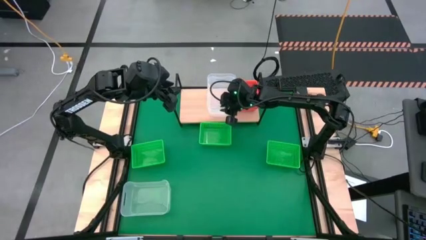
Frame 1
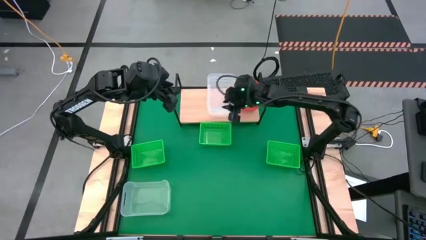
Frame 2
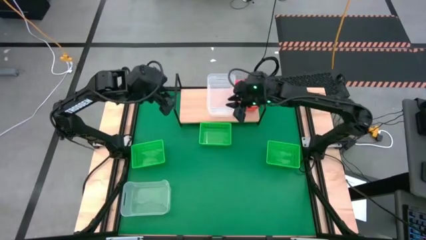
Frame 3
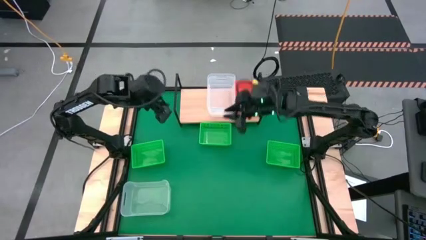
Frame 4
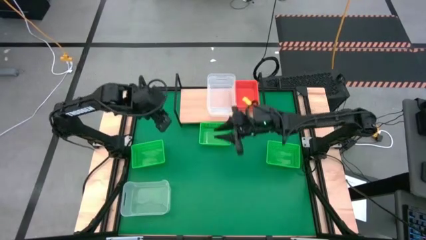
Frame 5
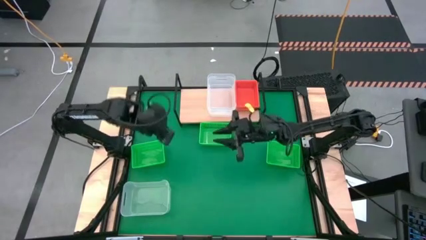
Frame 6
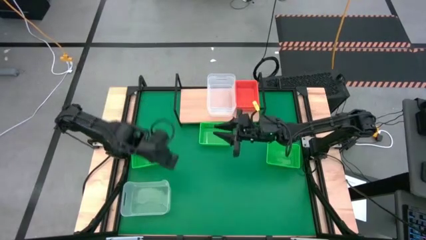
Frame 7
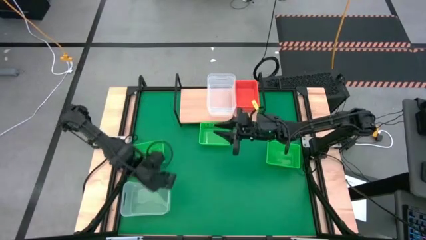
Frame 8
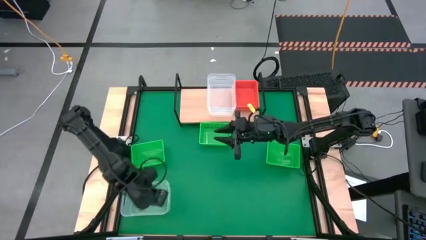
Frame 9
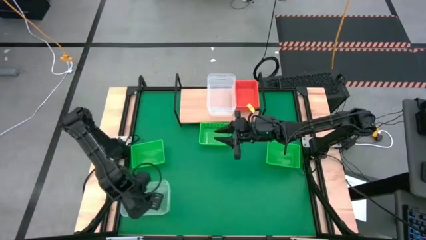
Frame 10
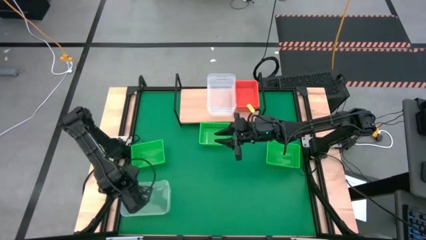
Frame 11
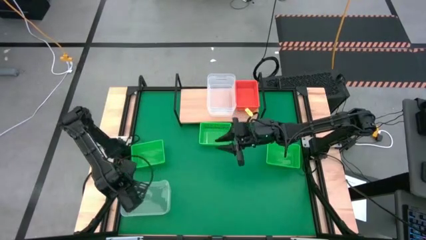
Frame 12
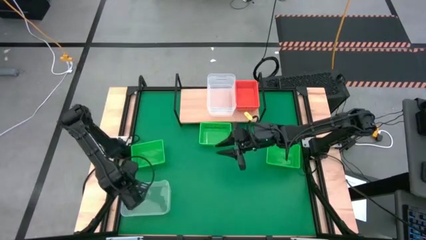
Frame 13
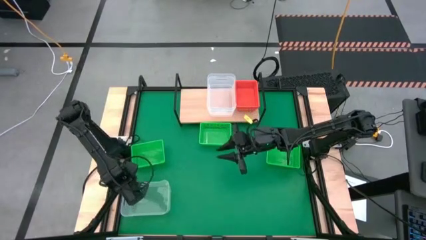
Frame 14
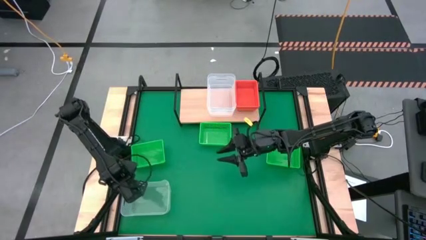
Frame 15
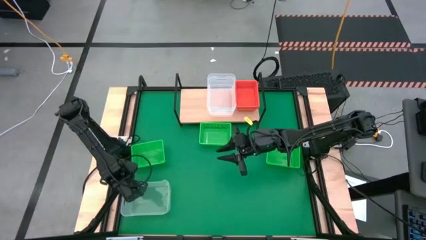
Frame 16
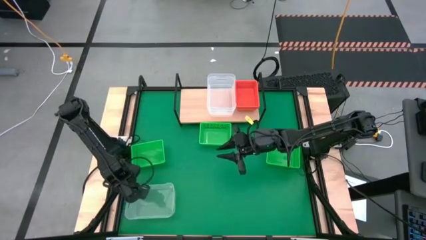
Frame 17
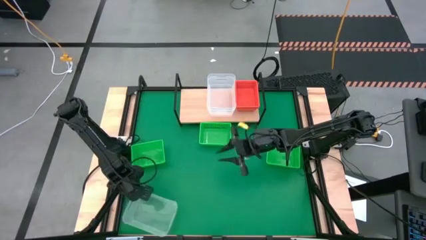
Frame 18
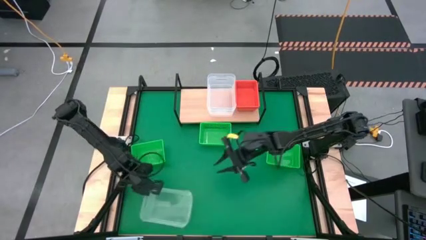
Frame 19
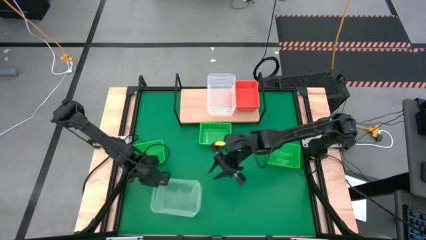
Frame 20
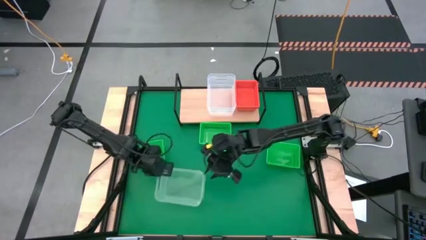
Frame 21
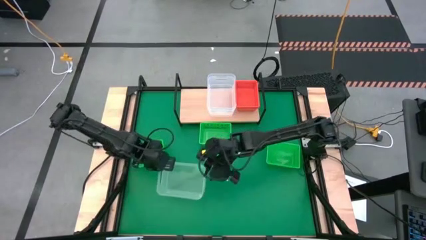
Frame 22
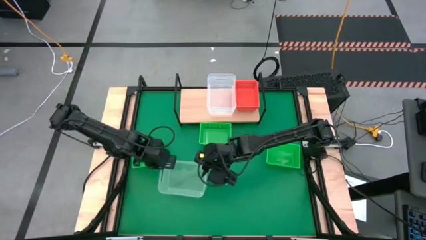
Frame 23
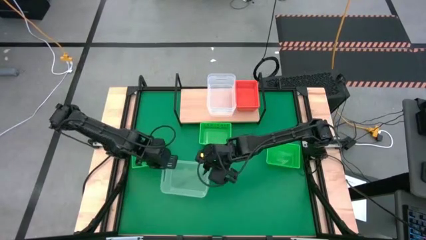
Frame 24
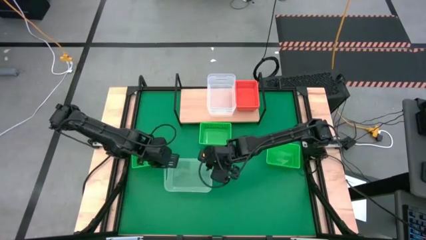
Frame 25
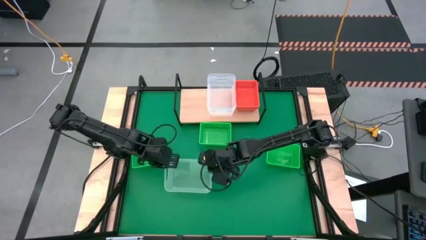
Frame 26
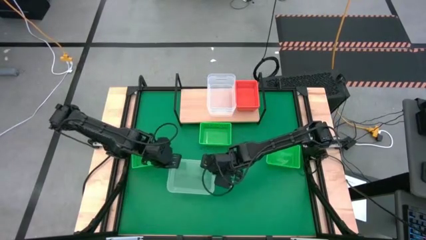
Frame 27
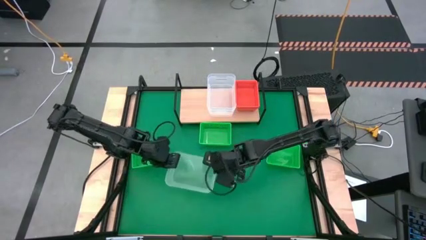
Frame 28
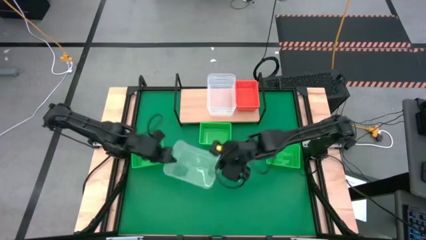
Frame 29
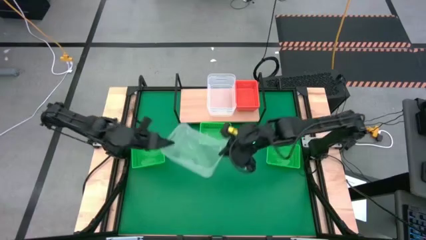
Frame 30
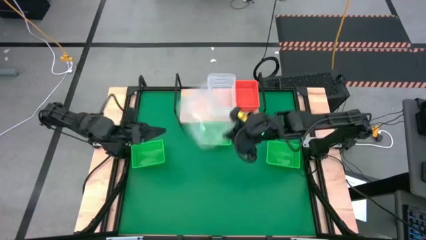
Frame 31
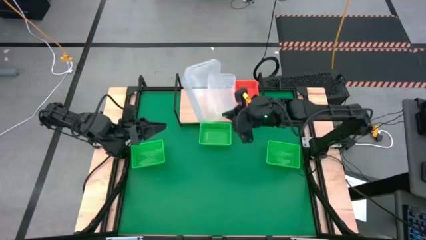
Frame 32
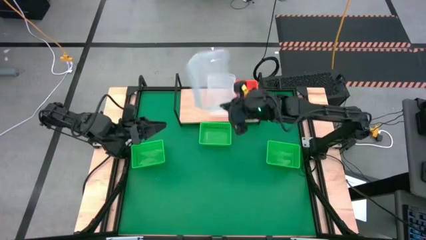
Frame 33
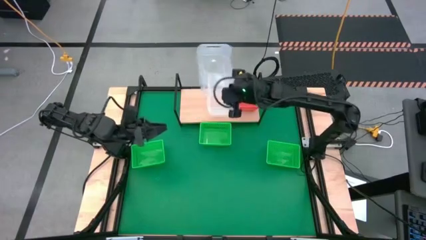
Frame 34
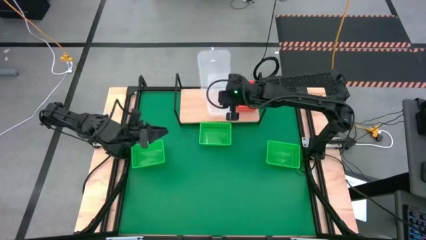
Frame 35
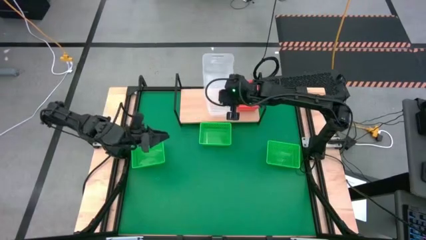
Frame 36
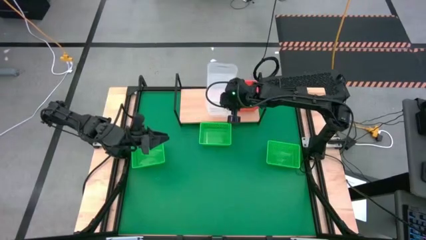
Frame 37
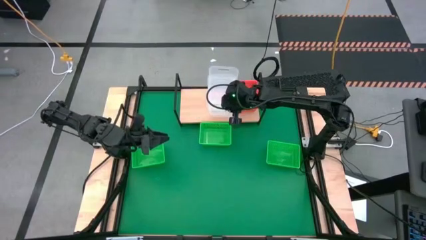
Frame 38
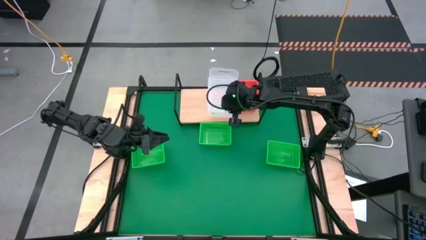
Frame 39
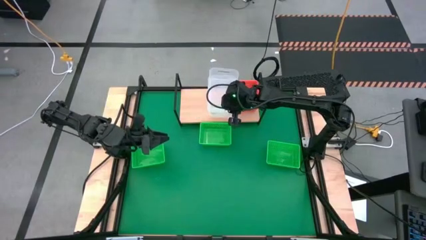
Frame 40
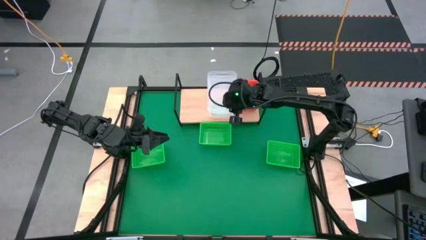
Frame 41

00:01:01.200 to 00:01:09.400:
Task: Stack baskets on shelf by color
Stack the transparent bin on top of the stacked transparent bins on the shelf

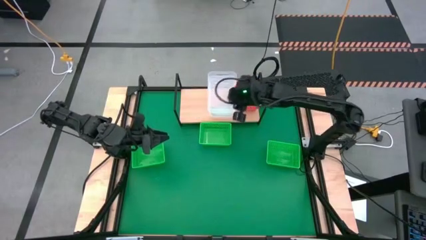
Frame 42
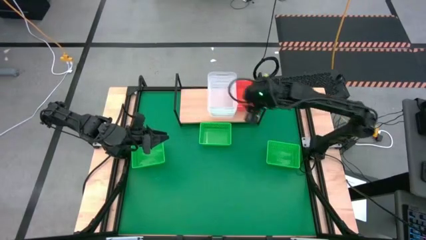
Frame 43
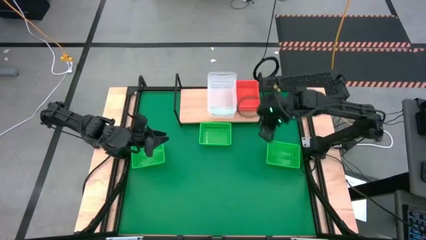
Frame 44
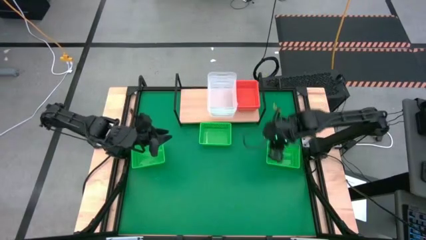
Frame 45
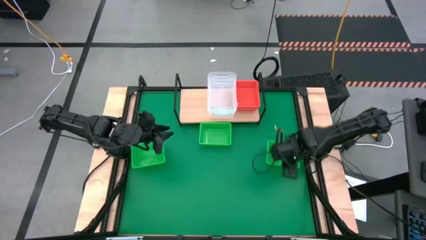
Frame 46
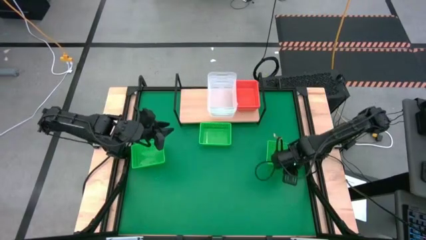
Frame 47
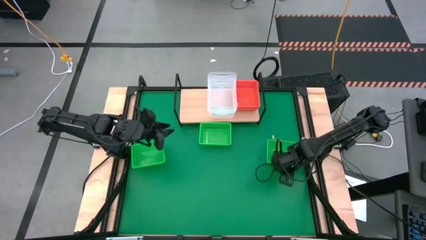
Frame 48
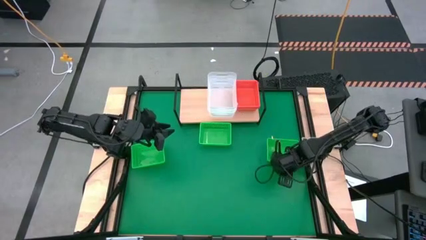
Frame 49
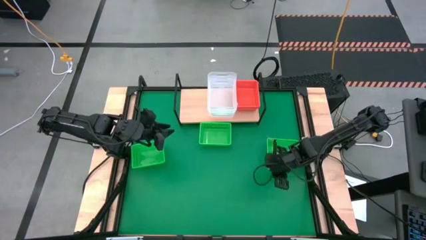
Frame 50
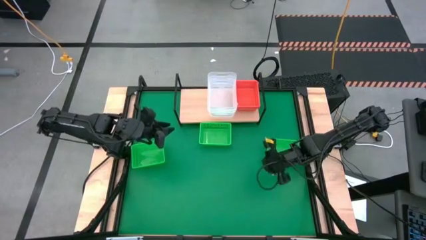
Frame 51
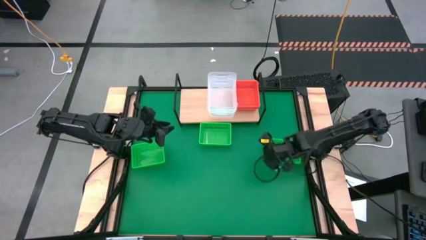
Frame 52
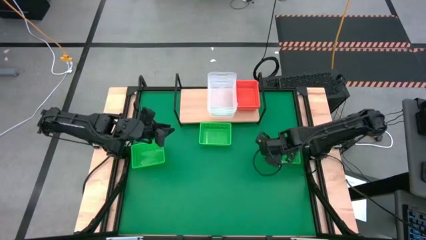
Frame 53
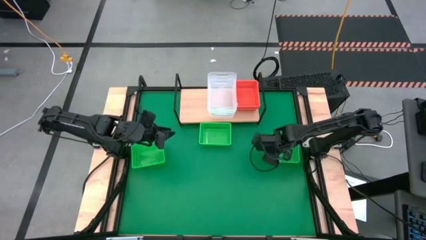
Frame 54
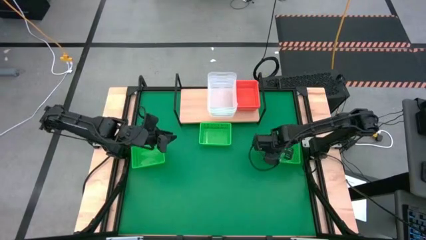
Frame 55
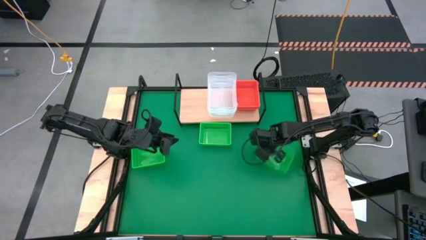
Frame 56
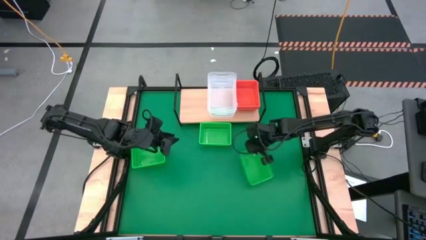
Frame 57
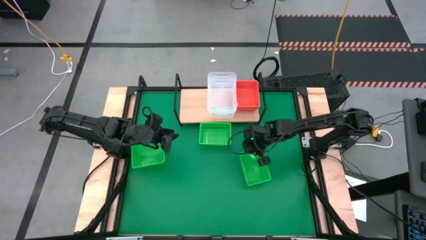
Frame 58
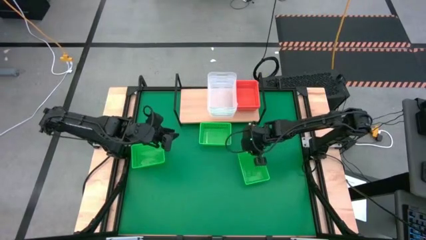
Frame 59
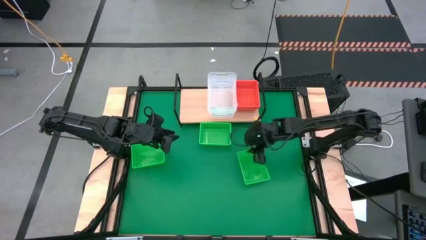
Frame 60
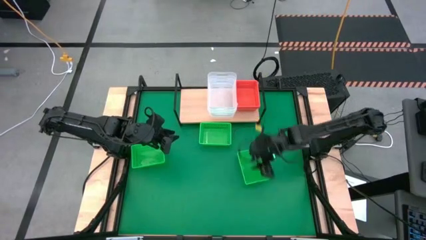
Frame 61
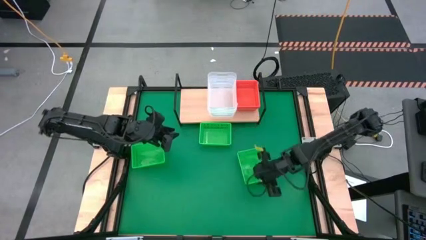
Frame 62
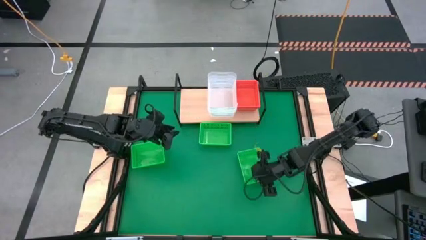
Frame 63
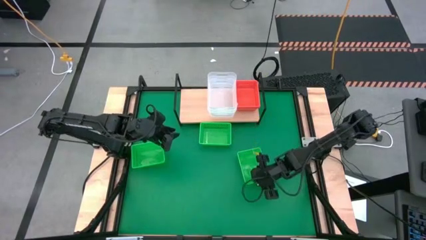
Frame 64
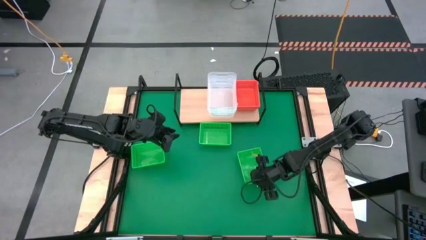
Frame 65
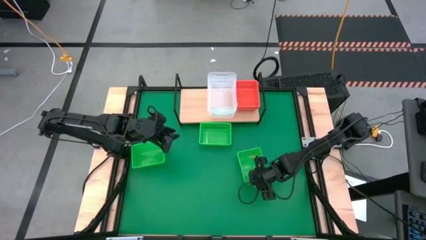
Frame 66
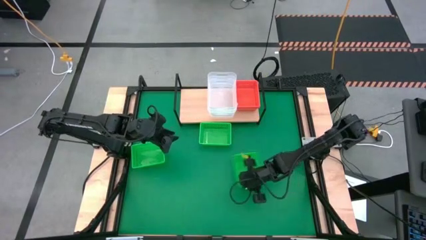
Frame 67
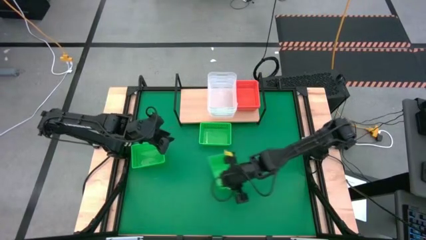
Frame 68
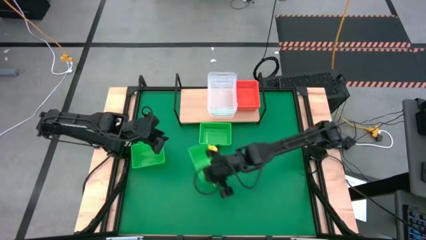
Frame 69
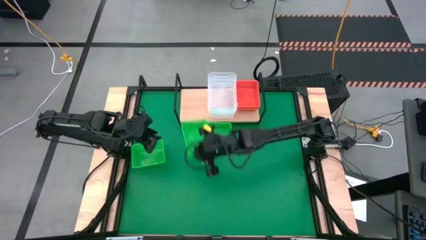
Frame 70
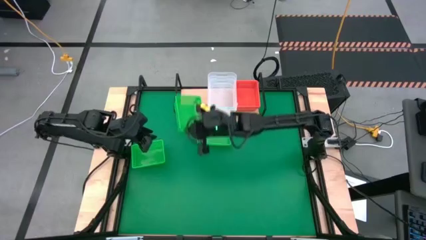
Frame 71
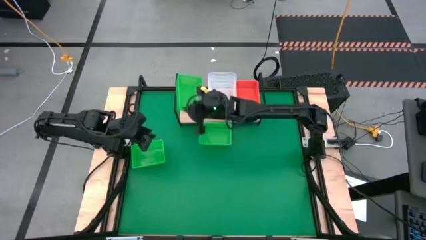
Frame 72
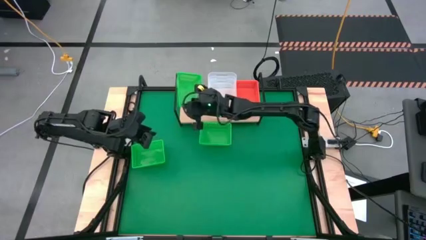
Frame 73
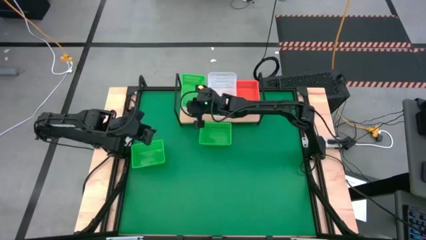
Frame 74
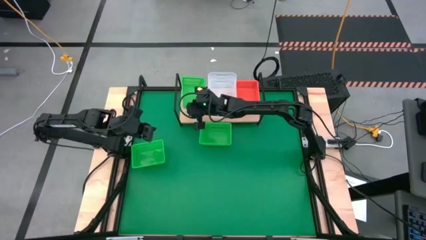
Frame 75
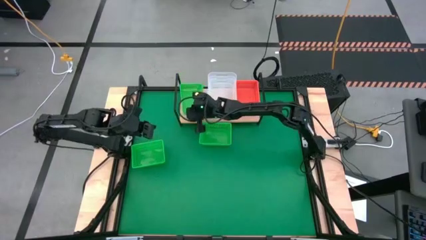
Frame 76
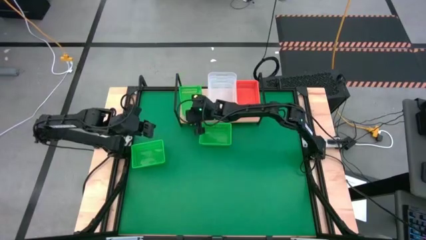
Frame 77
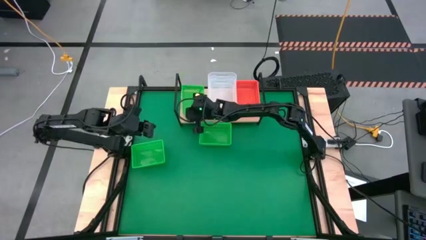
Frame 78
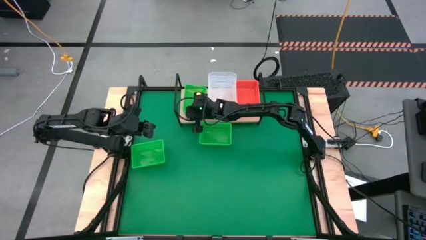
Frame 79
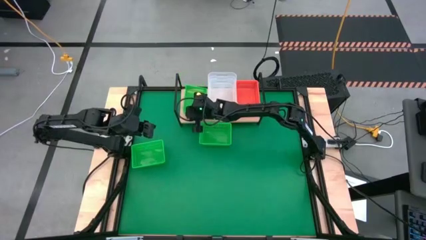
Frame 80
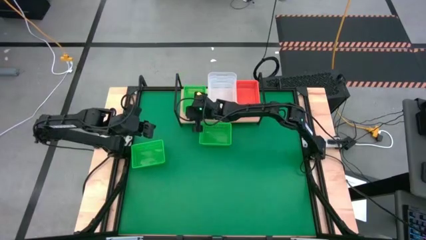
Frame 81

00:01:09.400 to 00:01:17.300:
Put the right green bin on the shelf
